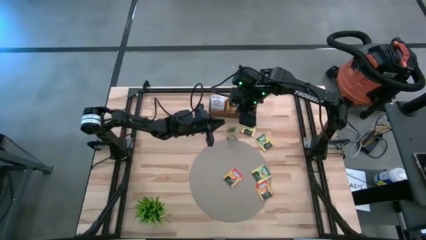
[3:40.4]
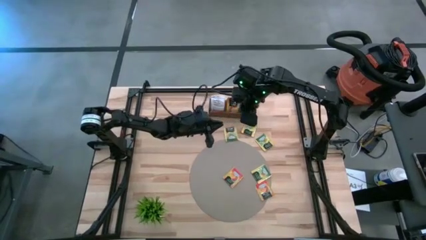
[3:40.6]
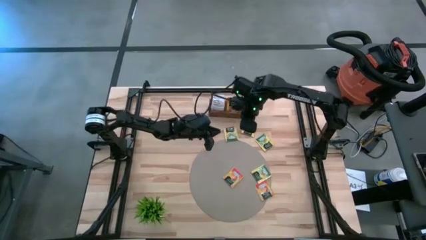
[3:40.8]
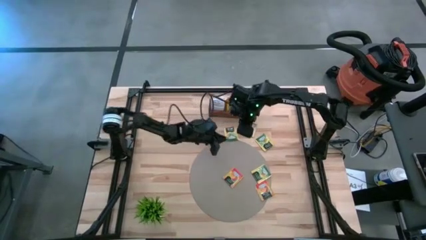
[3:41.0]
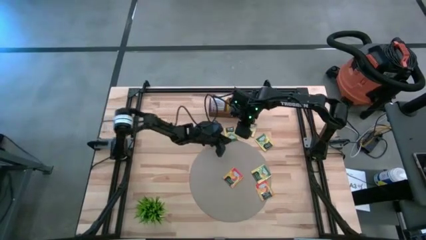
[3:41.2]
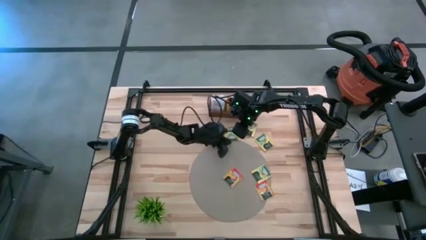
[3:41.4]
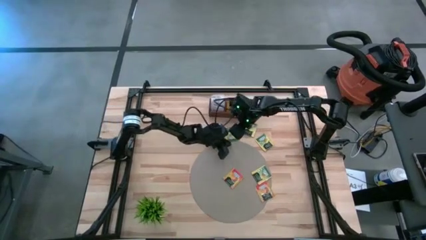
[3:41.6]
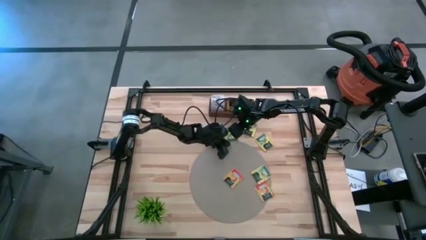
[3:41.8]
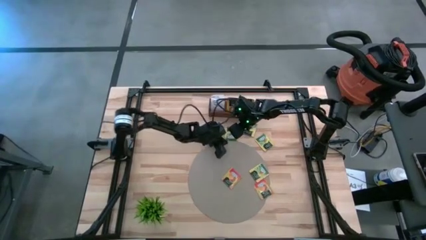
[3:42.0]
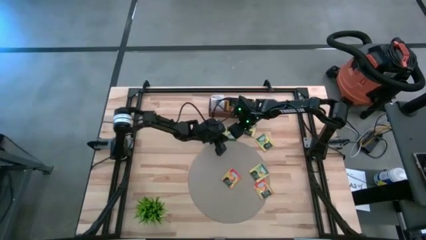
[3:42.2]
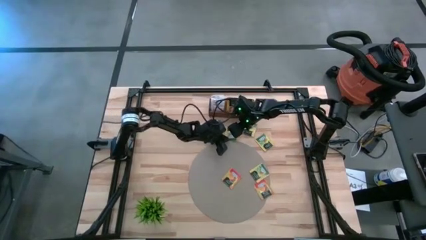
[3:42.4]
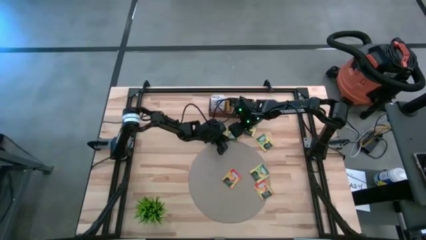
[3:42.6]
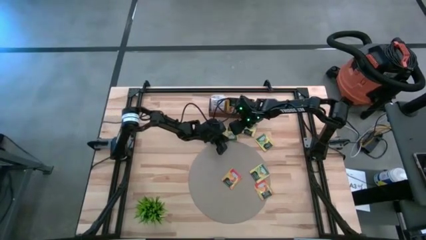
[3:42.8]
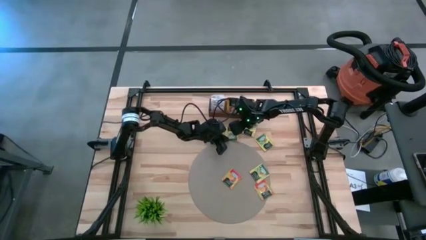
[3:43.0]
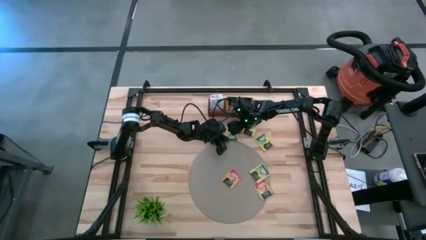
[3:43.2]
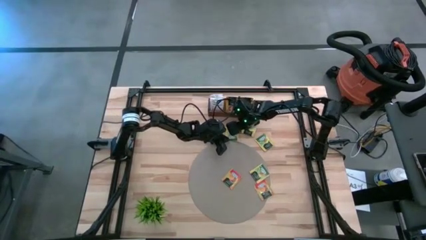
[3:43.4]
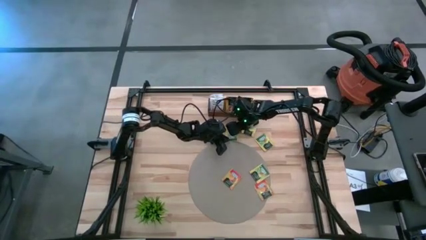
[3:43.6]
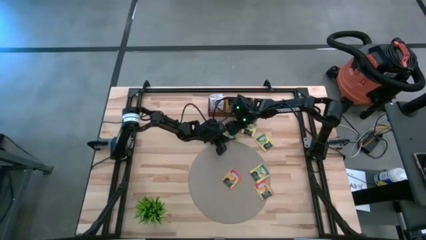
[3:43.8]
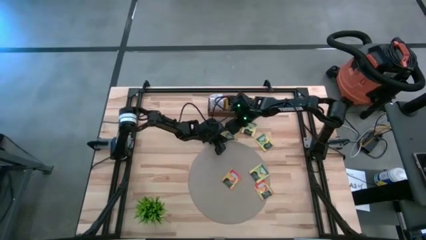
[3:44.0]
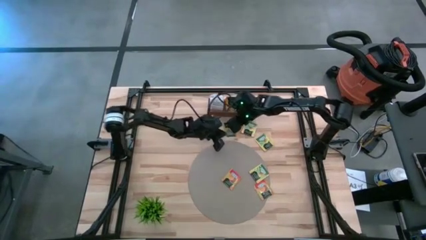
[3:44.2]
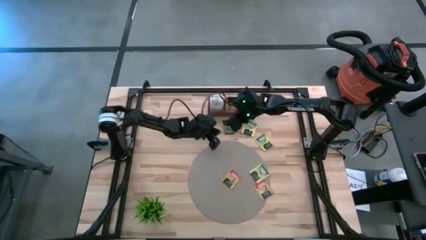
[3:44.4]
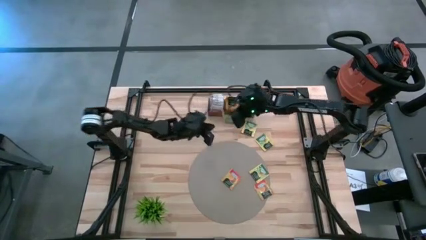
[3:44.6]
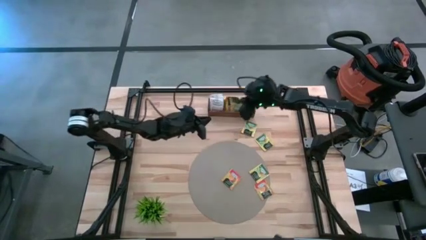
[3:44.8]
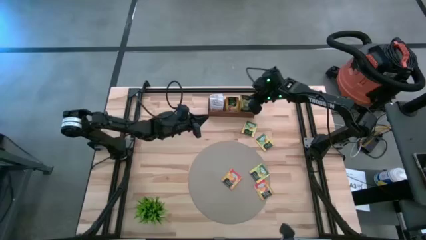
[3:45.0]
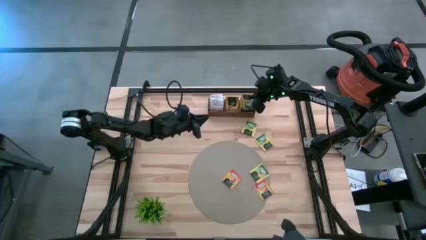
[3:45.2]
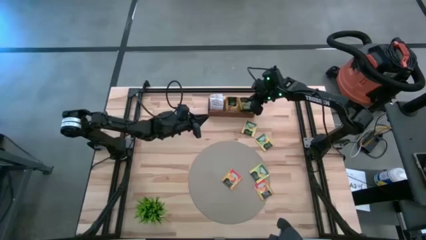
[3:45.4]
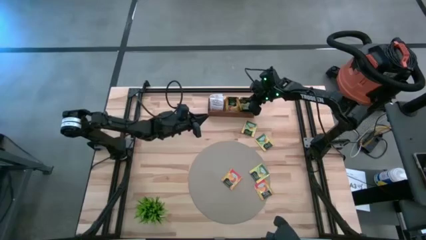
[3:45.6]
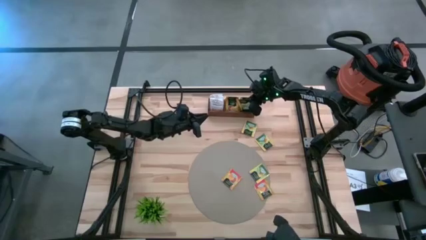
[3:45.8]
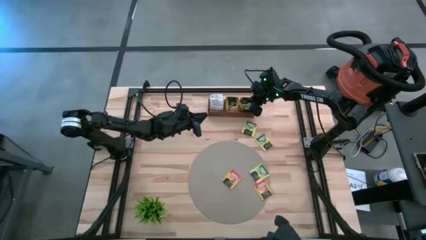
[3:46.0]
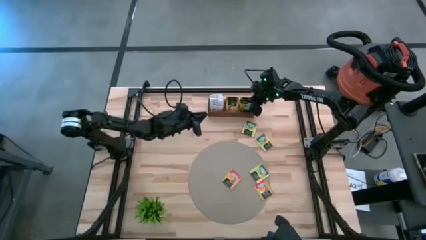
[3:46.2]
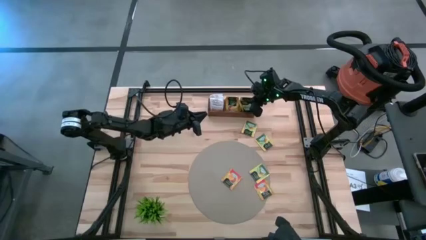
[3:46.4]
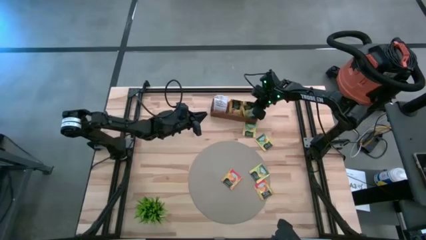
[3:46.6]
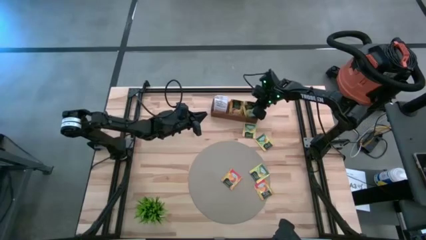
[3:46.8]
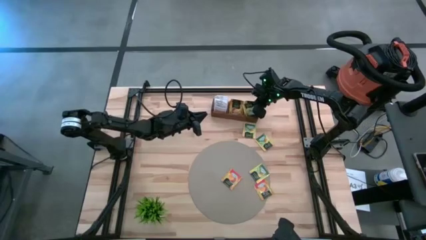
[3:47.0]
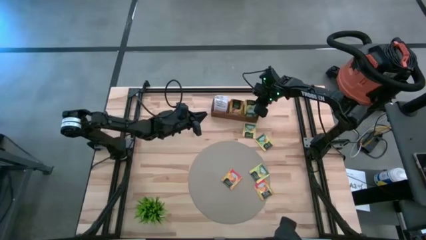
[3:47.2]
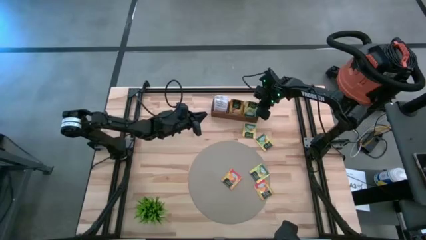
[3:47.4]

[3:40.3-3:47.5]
Task: Pick & Place Tea
Put the yellow tea bag into the right section of the wooden organizer

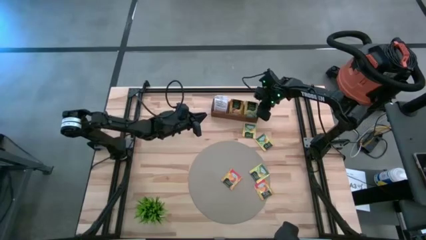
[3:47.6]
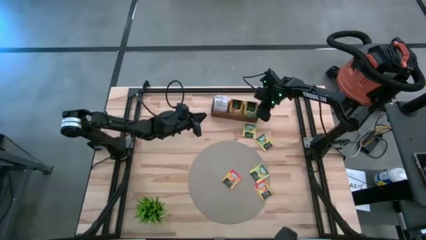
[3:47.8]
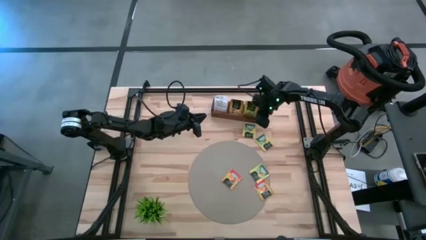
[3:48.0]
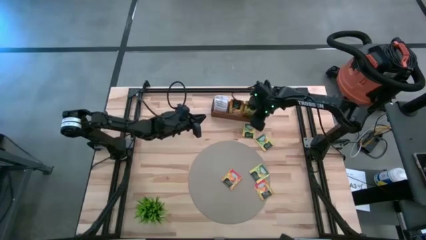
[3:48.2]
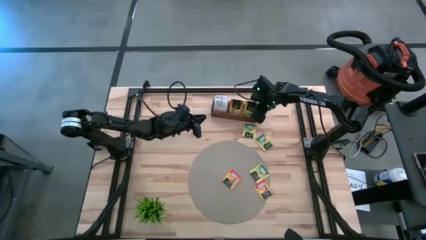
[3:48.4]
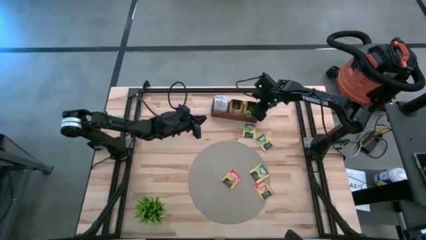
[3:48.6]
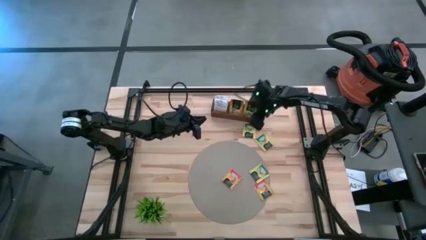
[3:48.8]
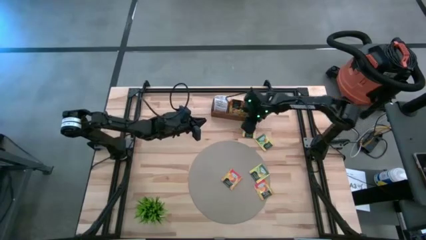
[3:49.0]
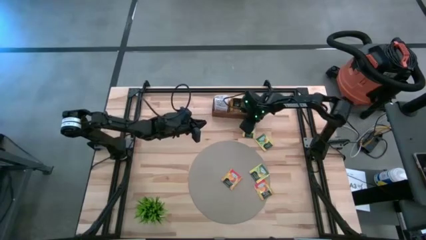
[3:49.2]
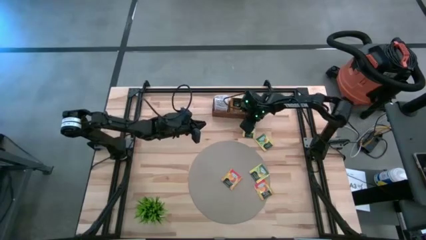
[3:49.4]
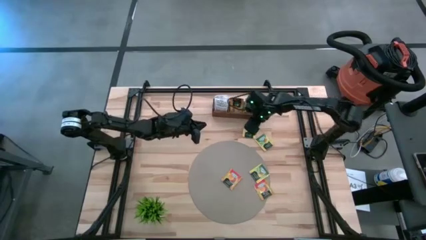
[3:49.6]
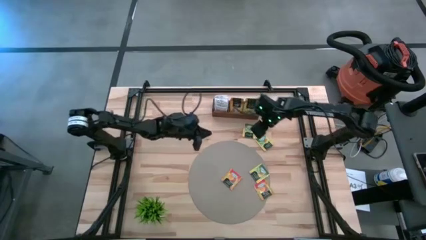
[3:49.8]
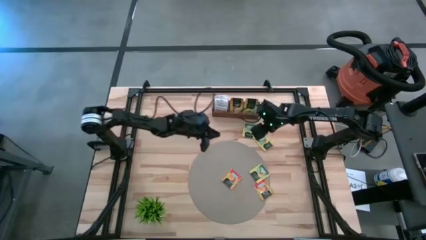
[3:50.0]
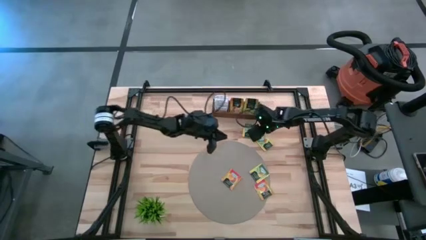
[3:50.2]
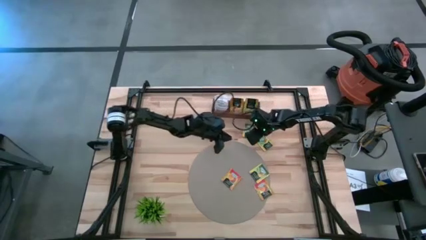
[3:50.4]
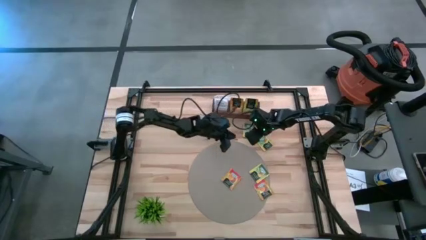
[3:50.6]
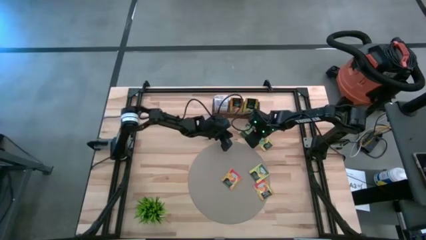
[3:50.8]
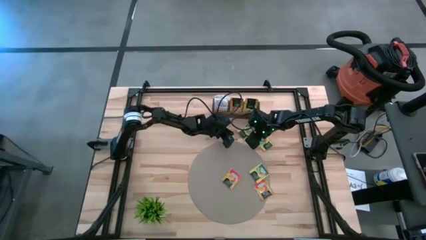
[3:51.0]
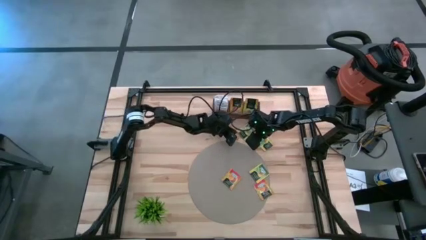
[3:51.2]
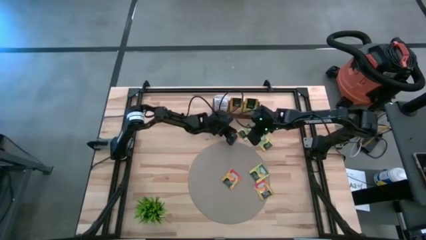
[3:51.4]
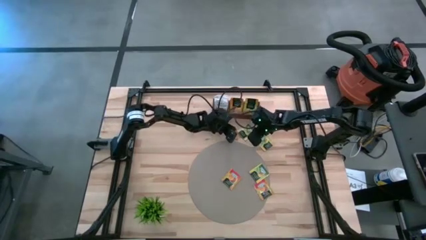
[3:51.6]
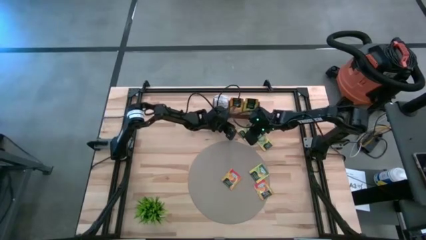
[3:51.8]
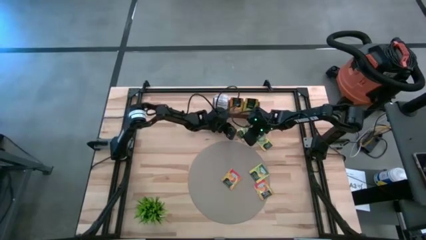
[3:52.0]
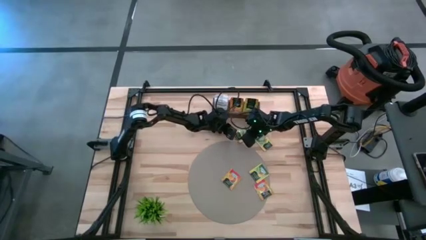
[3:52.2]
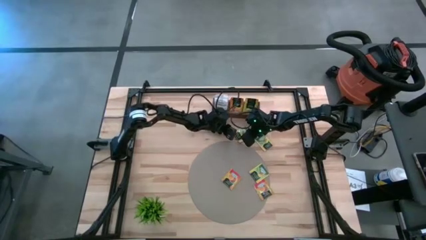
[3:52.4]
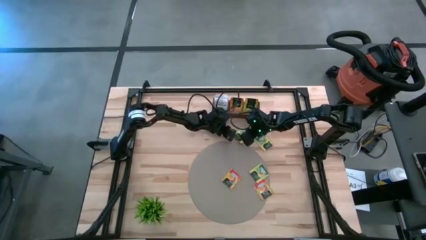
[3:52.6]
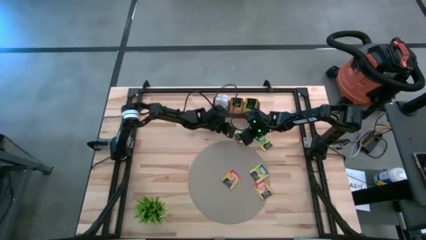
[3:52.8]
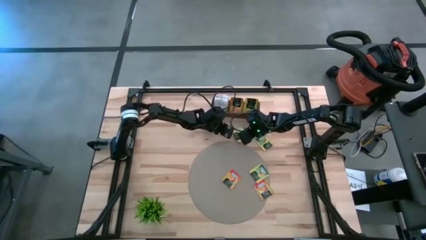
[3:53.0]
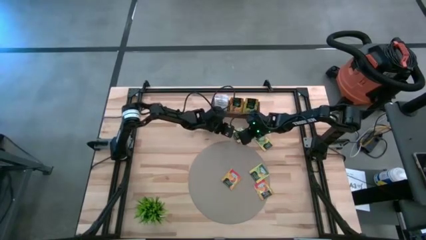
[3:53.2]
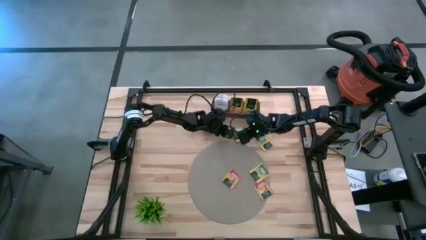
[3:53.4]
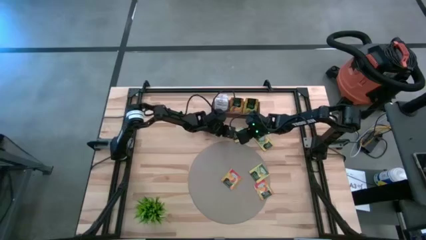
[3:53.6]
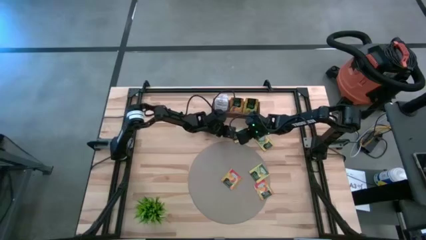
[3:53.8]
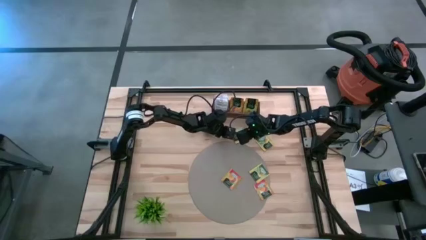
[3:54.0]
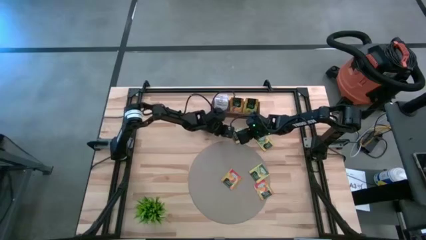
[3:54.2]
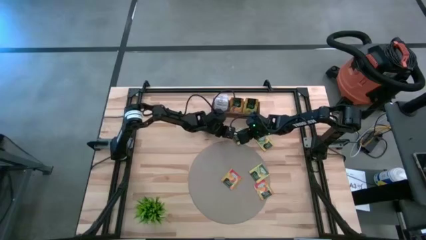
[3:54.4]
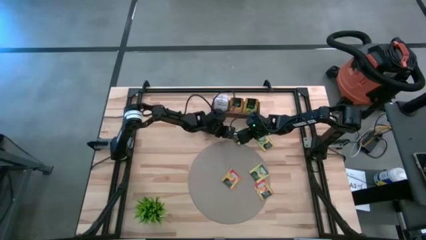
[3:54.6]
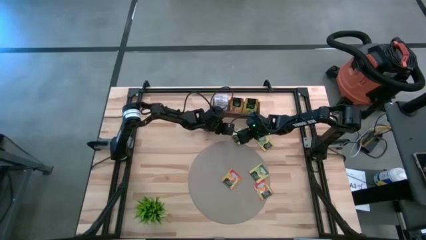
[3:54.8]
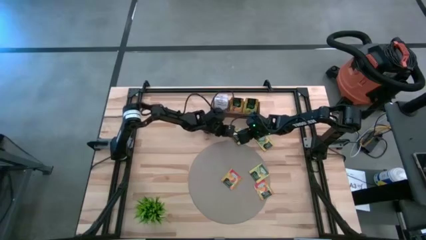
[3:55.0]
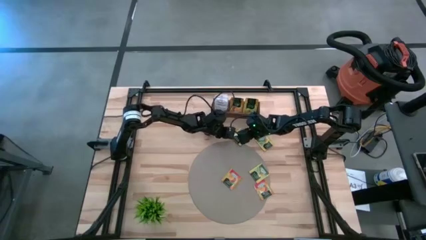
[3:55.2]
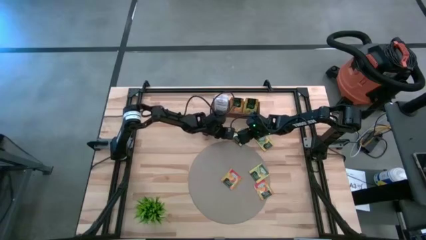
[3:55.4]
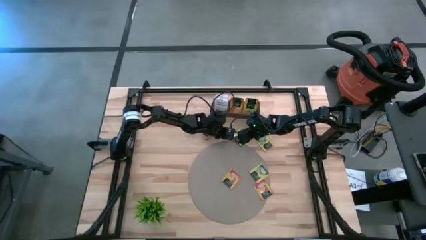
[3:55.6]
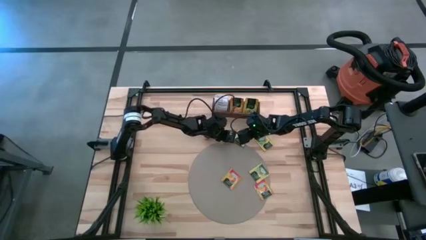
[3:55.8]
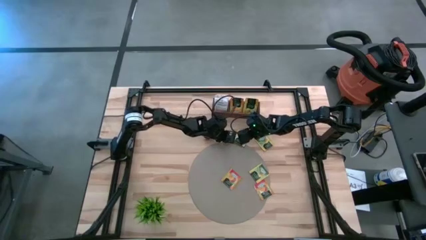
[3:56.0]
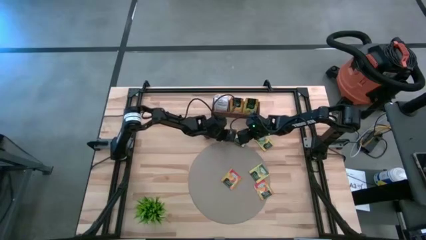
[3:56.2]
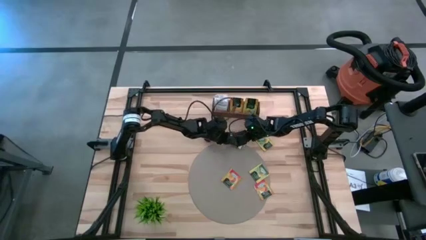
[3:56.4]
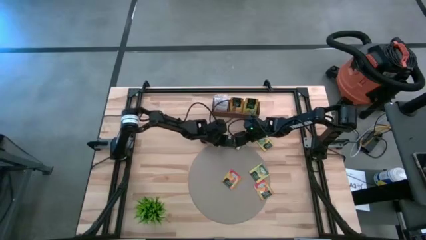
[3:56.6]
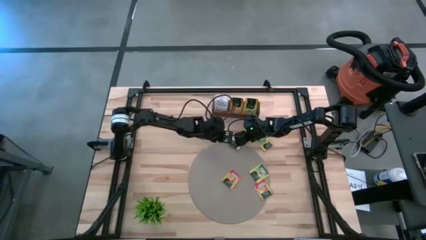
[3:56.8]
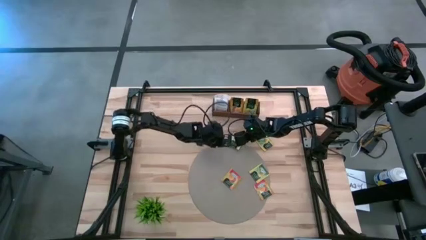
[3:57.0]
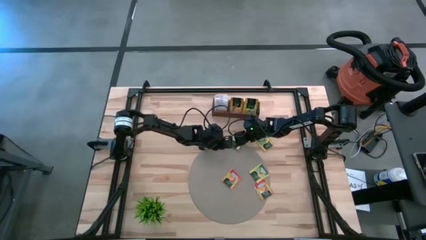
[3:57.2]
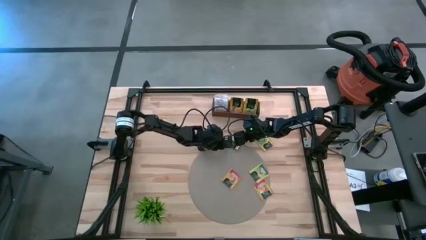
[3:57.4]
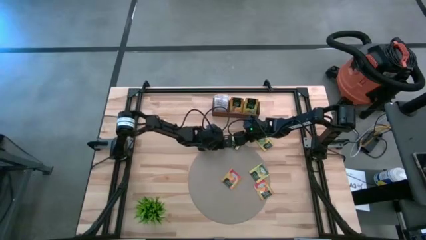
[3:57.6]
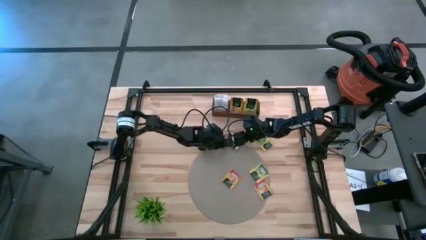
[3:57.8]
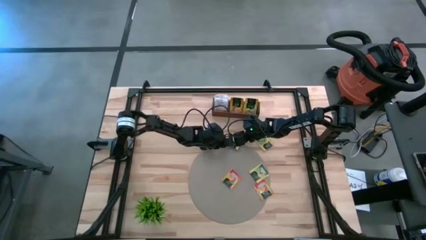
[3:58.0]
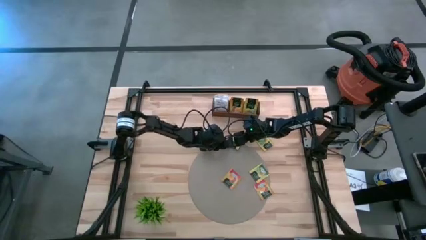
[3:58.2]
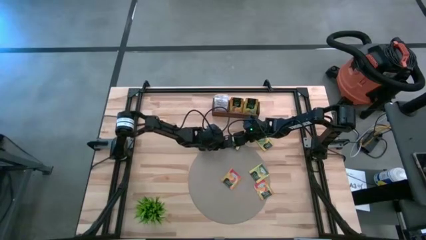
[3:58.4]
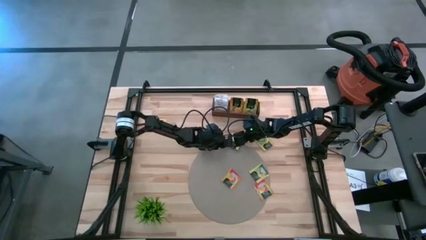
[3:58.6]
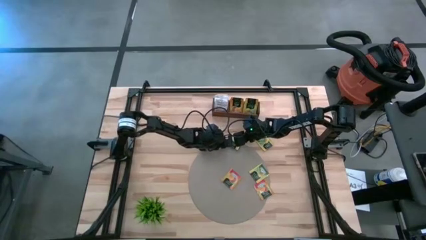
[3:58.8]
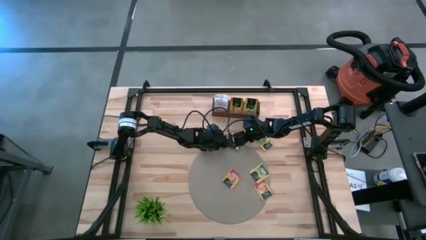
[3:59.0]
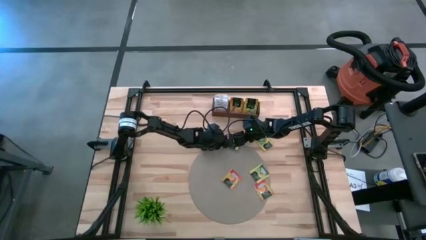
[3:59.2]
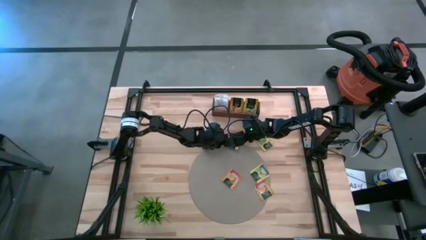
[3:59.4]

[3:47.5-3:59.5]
Put the yellow tea bag into the right section of the wooden organizer
